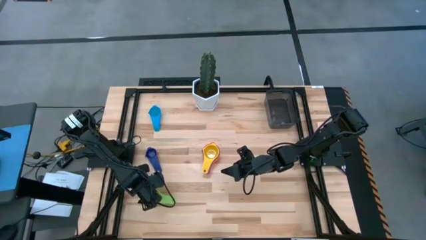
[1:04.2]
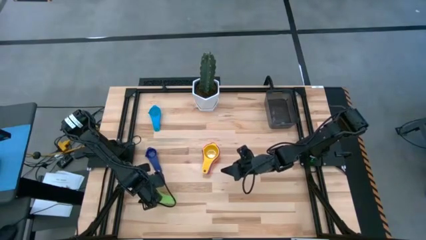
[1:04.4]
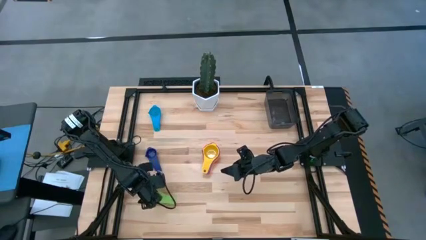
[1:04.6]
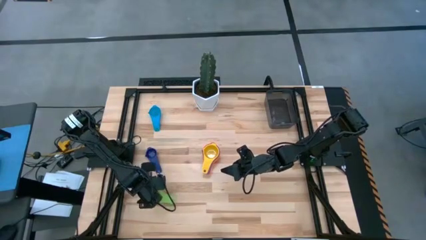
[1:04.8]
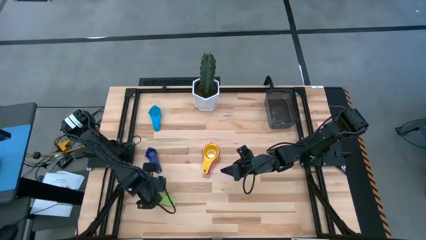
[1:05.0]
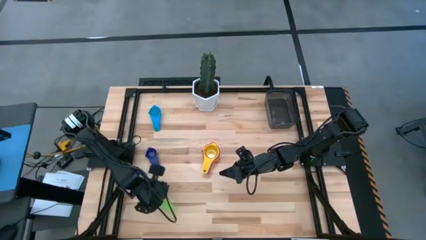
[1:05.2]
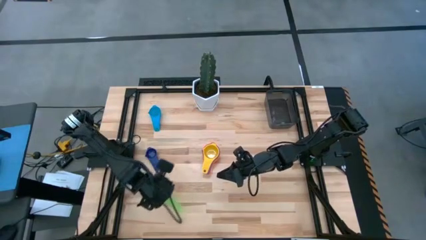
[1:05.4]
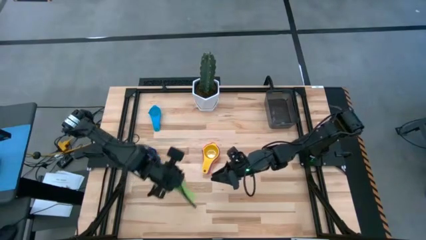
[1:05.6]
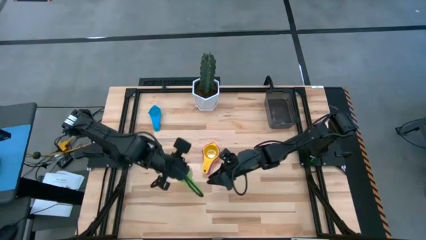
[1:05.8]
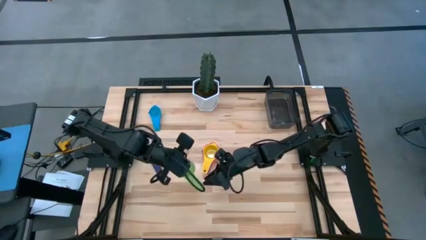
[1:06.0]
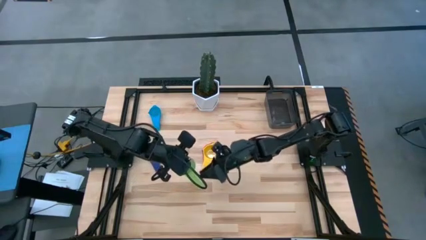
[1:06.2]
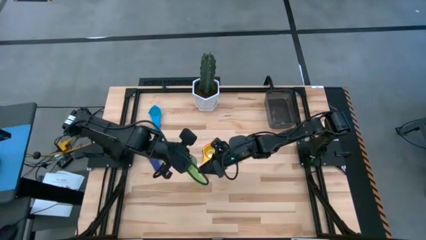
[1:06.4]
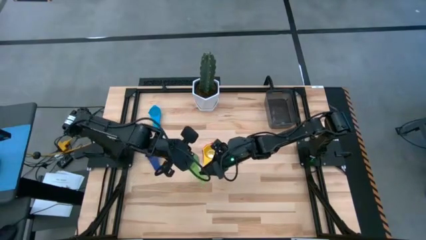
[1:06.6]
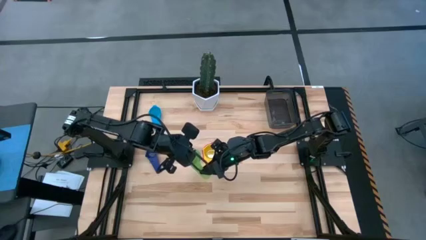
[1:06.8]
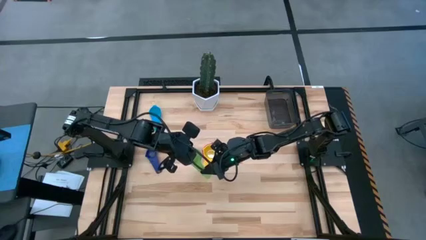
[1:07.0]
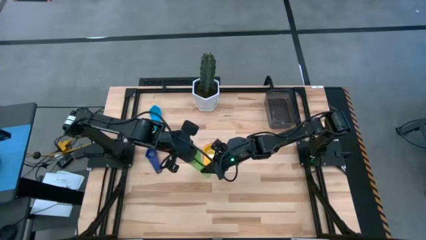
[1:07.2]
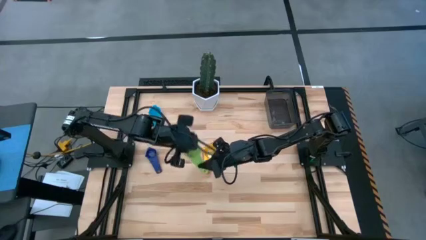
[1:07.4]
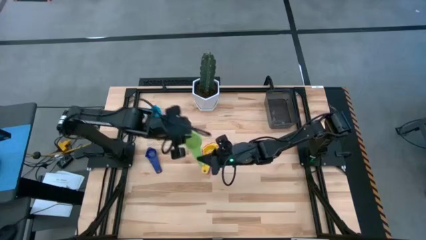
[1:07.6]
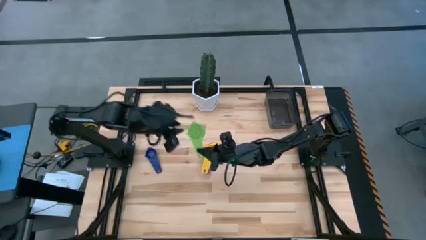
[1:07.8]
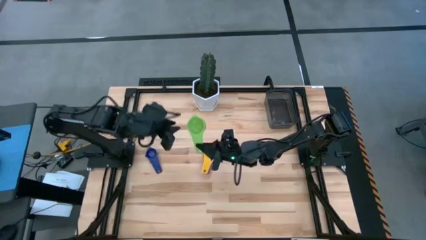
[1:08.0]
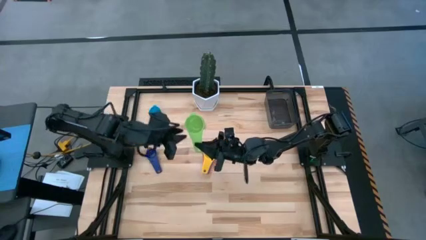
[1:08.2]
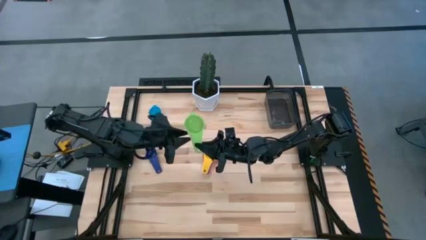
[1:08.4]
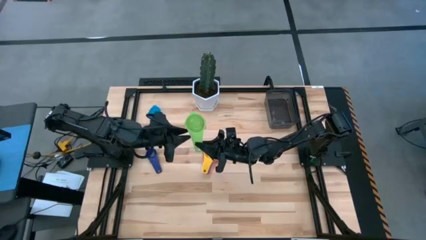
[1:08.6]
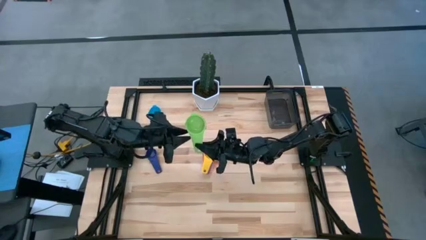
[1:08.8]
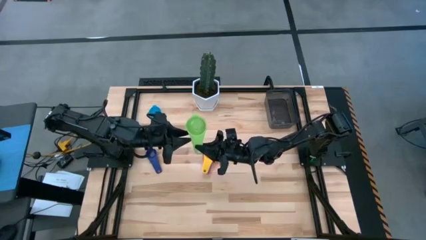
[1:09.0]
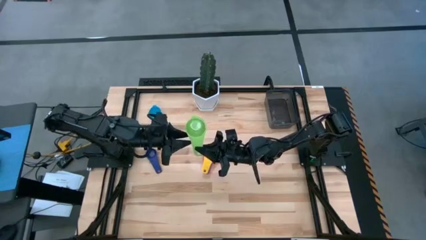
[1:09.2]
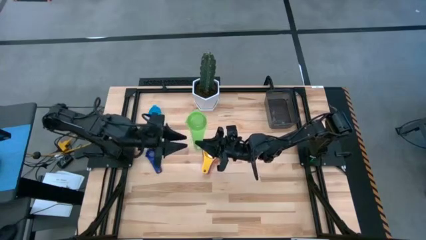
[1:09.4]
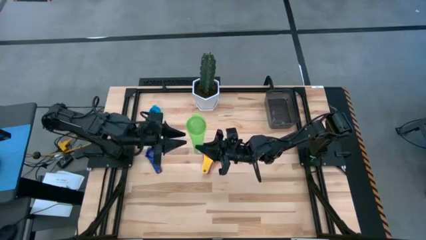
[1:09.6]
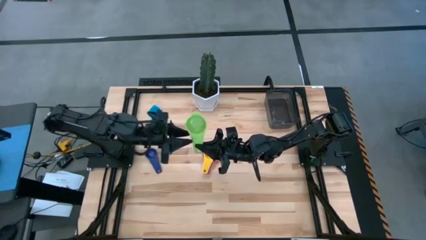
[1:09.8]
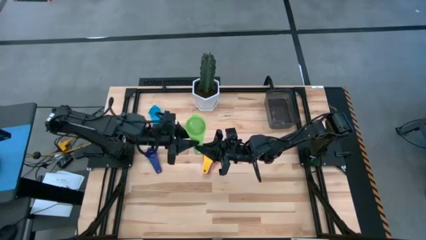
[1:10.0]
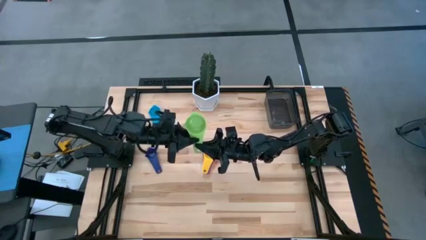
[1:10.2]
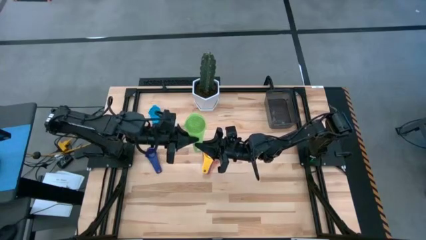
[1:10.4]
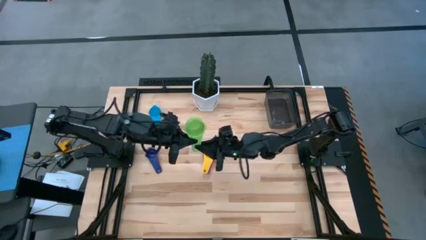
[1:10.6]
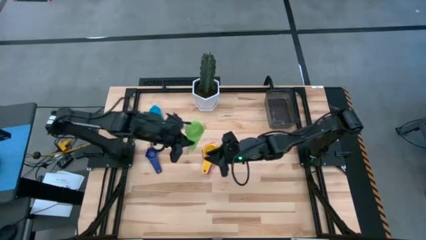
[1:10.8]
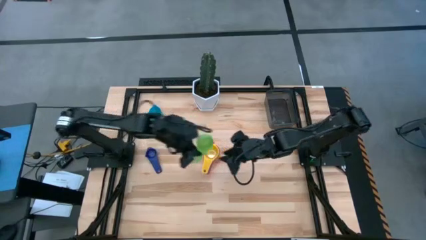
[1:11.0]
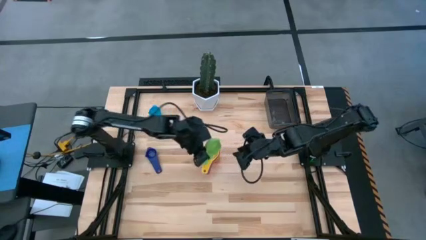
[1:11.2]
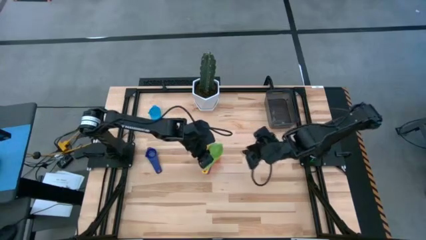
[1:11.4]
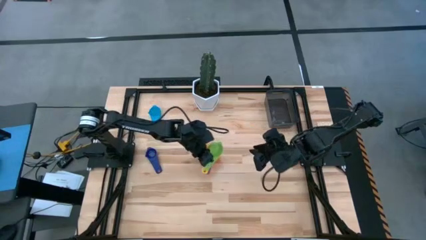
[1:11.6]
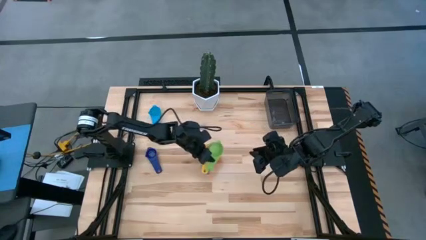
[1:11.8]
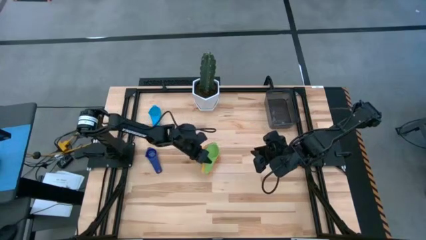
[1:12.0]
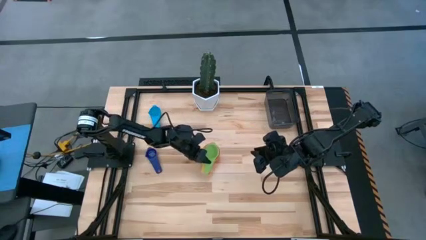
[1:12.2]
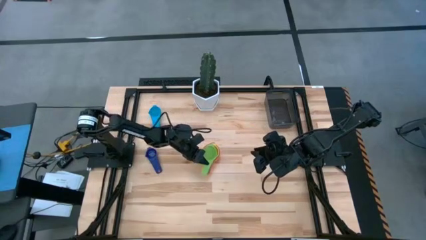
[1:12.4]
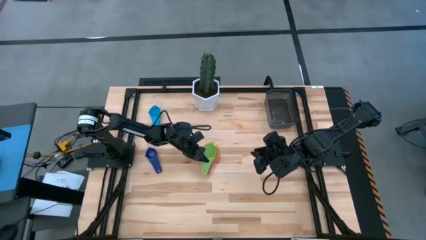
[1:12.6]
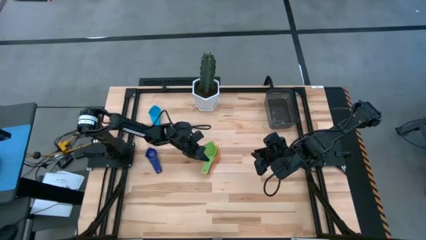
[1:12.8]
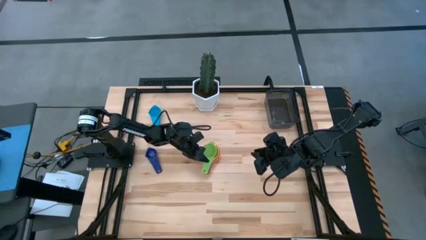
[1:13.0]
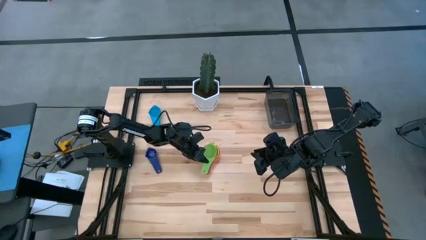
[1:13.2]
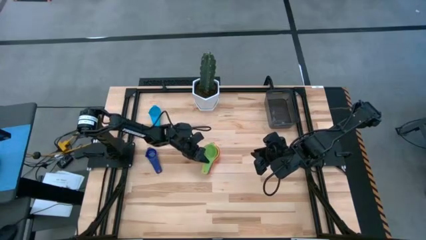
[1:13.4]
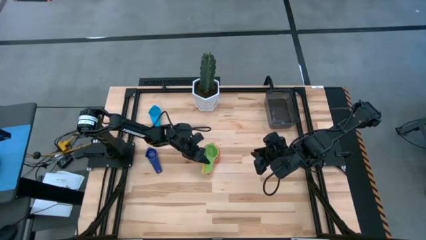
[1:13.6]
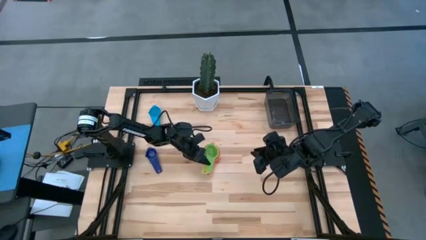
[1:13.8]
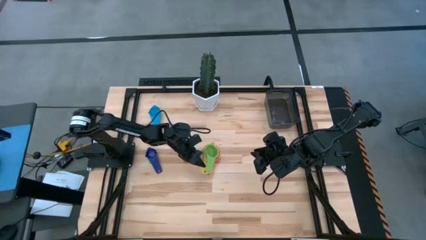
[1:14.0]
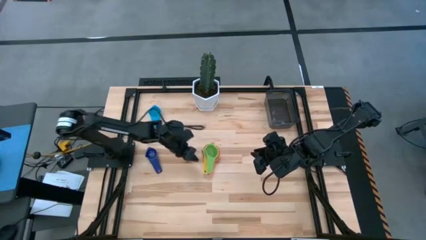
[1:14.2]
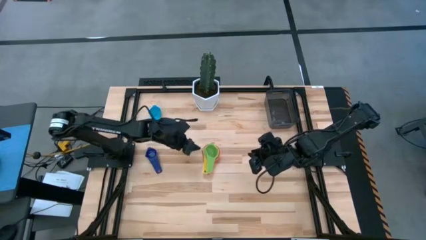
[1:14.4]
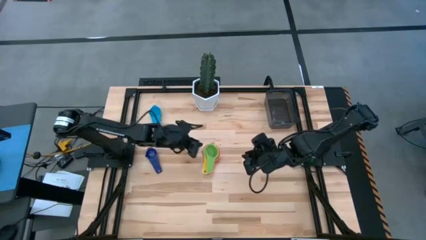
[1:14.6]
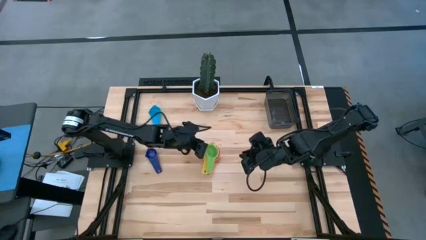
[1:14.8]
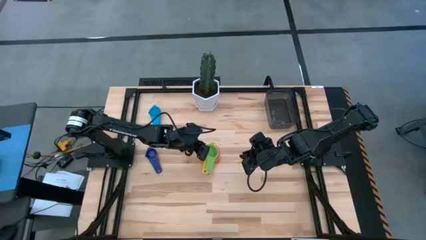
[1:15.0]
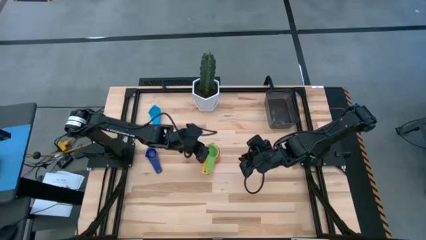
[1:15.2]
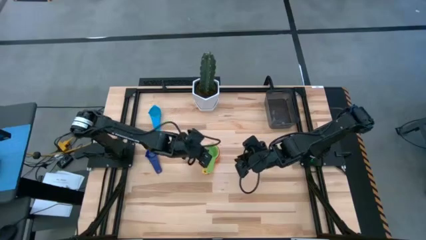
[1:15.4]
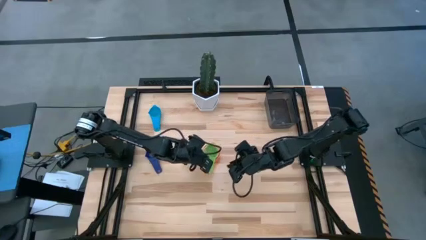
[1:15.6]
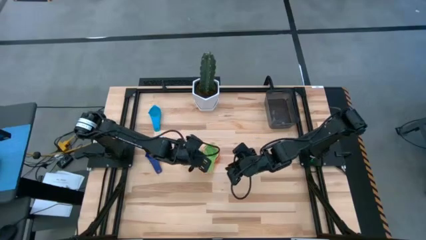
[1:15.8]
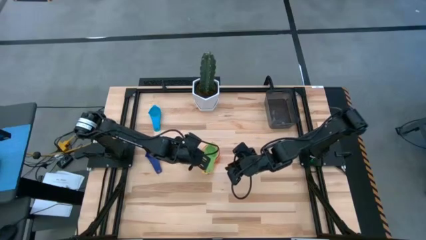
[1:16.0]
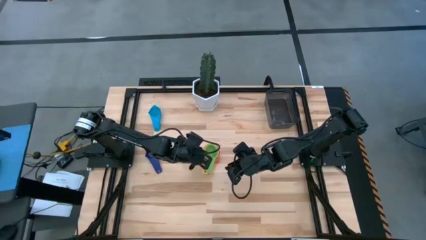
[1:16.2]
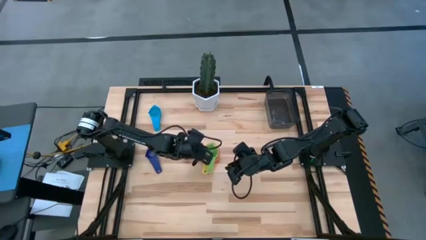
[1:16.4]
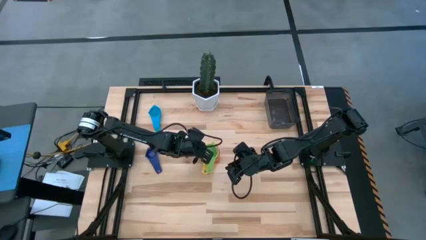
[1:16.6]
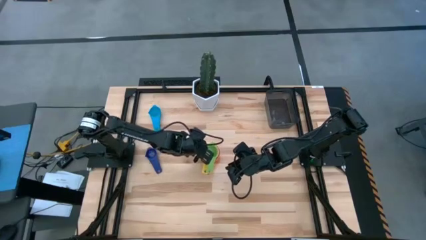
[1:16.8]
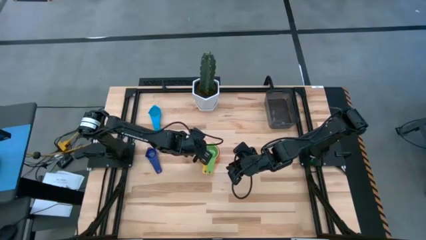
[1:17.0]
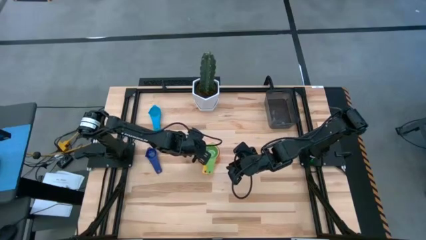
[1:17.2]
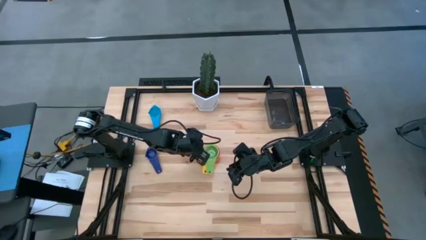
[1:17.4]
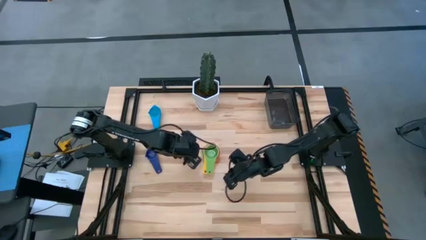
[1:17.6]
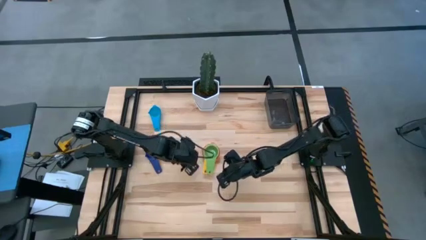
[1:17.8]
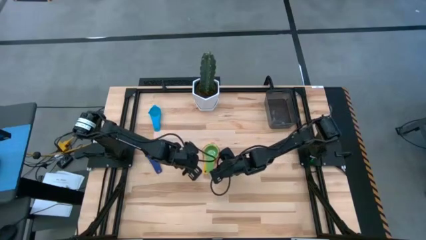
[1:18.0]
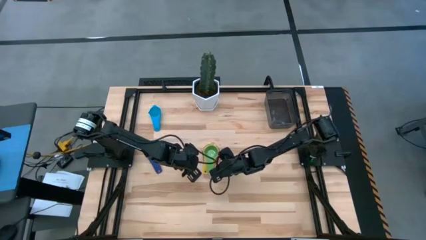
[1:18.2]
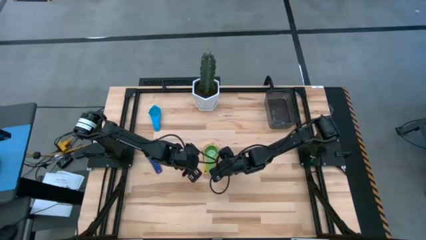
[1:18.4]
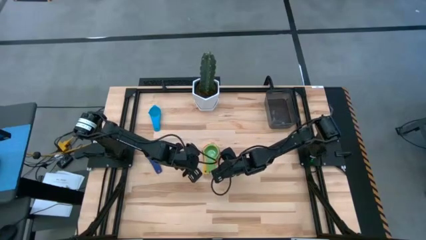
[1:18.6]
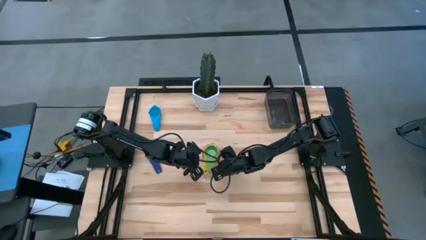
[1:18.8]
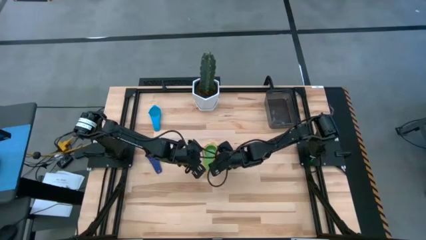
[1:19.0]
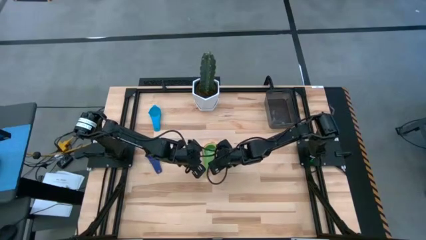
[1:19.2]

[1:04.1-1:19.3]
Task: Nest measuring cups in basket
Stack the green measuring cup on top of the yellow measuring cup
